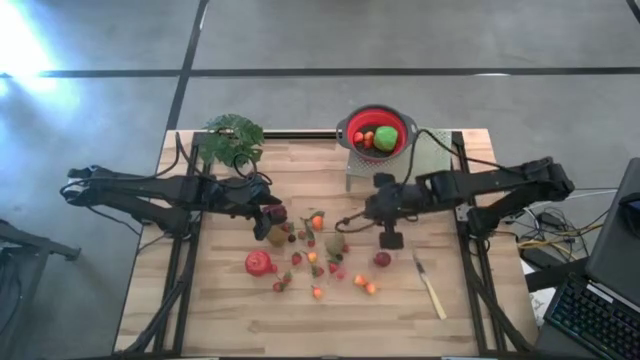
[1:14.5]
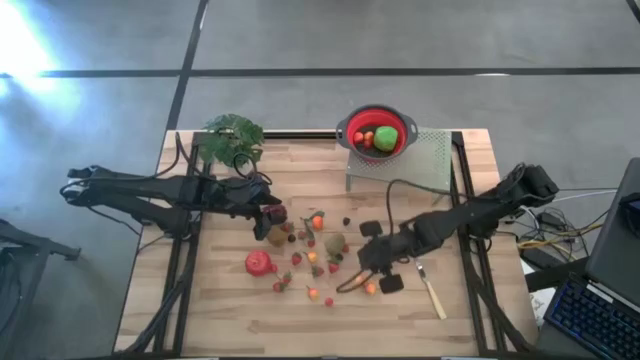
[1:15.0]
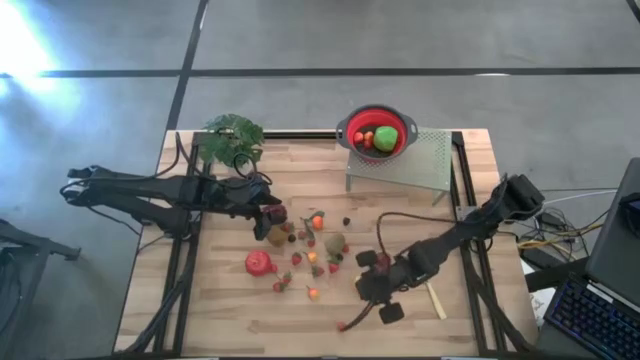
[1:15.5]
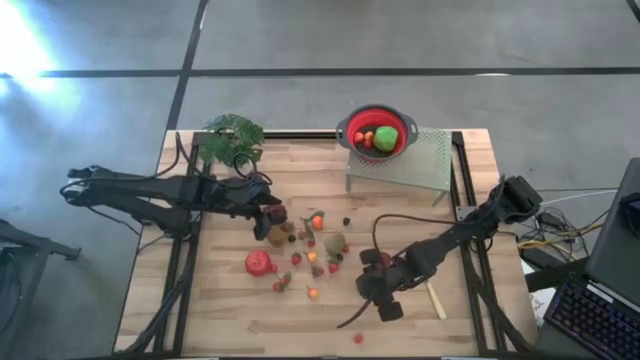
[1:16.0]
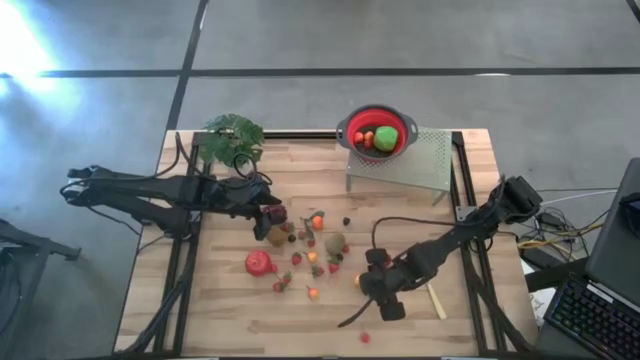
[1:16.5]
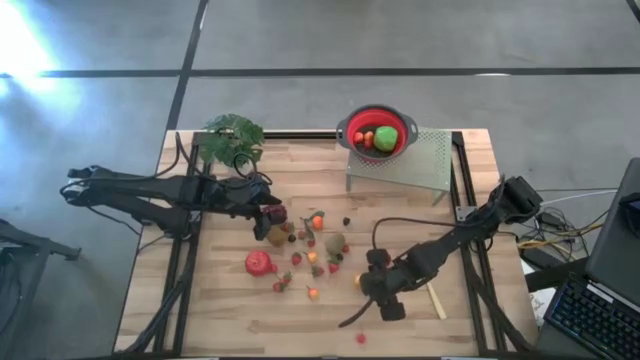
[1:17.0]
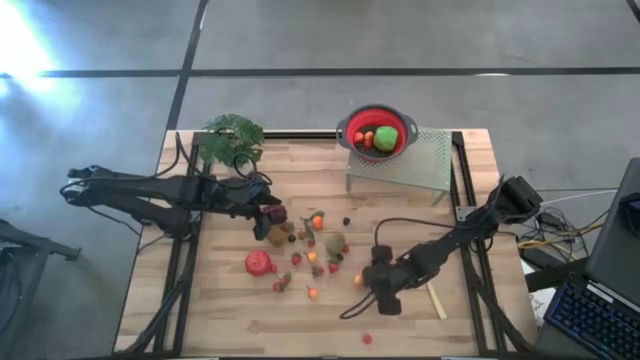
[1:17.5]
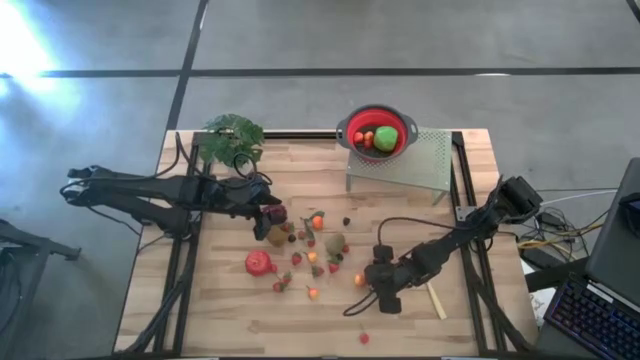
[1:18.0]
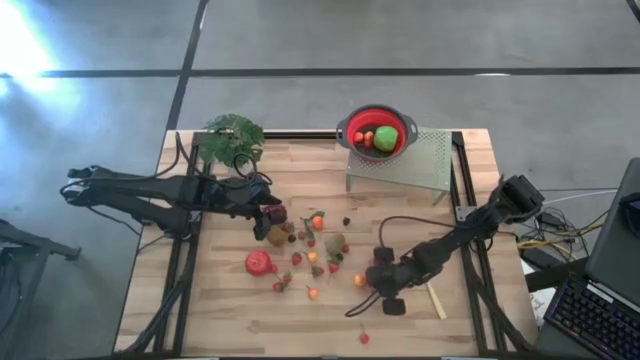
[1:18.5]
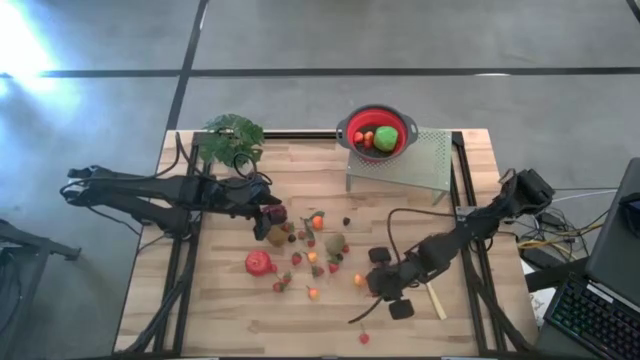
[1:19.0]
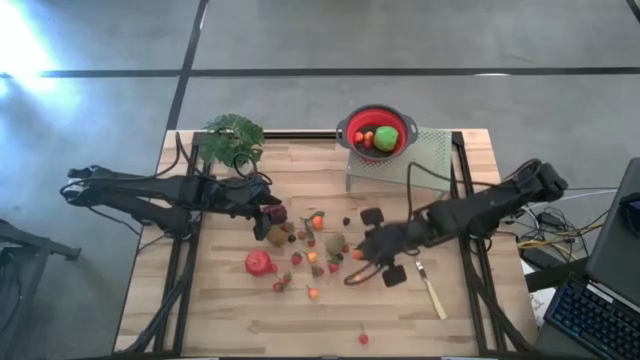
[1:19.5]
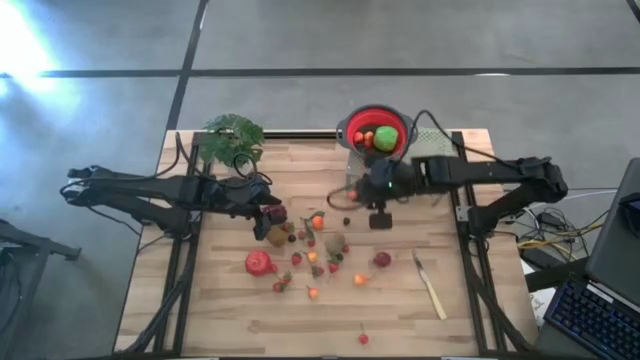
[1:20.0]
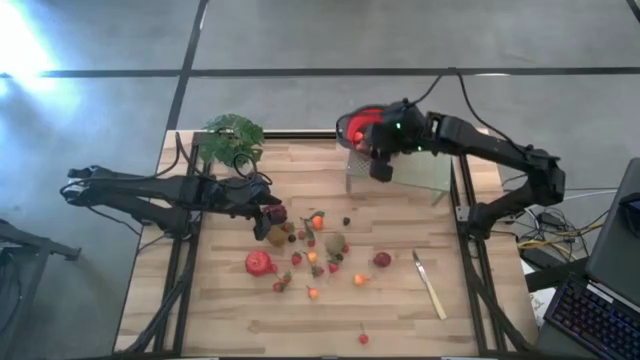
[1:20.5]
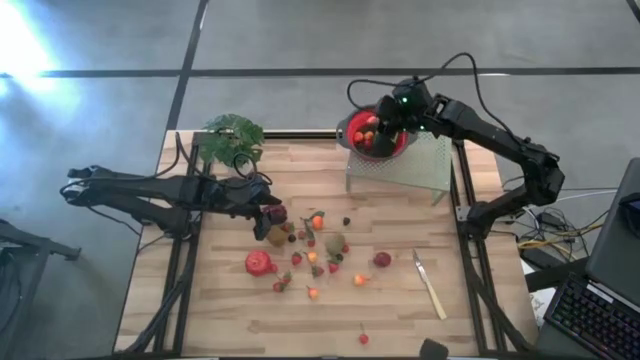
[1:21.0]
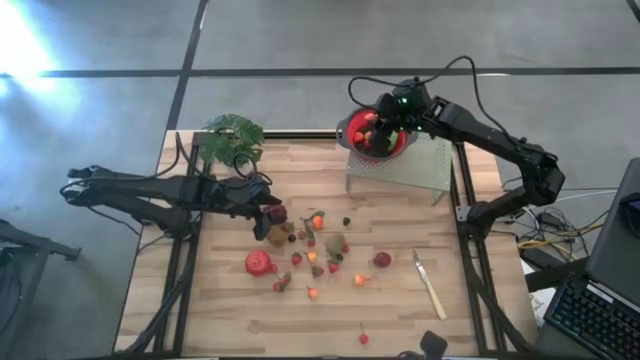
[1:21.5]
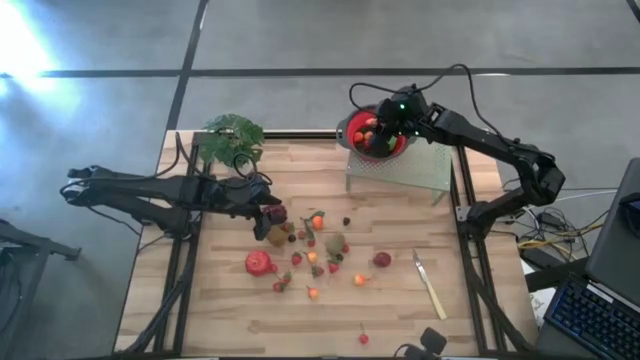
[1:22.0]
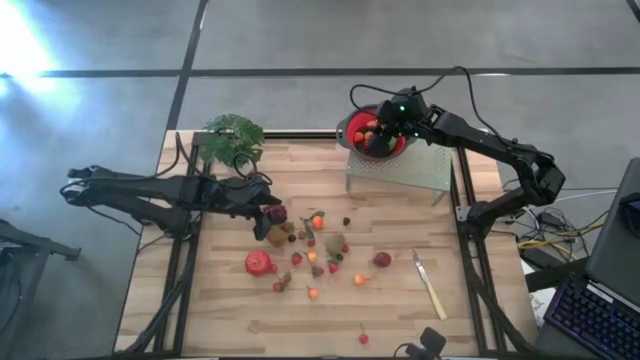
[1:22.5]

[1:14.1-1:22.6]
Task: Pick & Place Fruit
Put the pear into the strainer bowl on the shelf

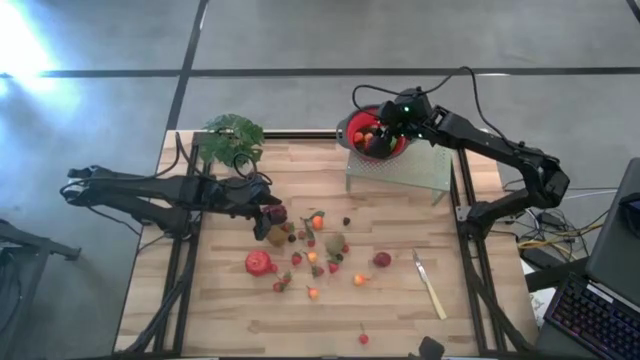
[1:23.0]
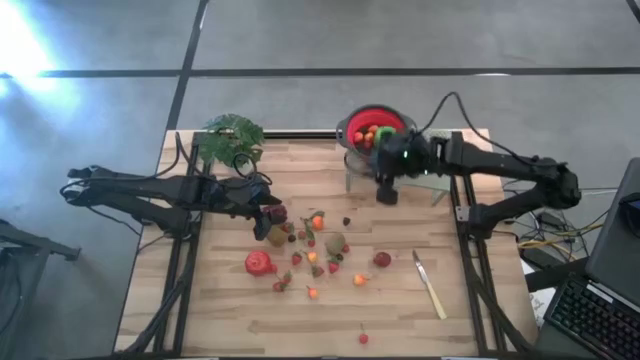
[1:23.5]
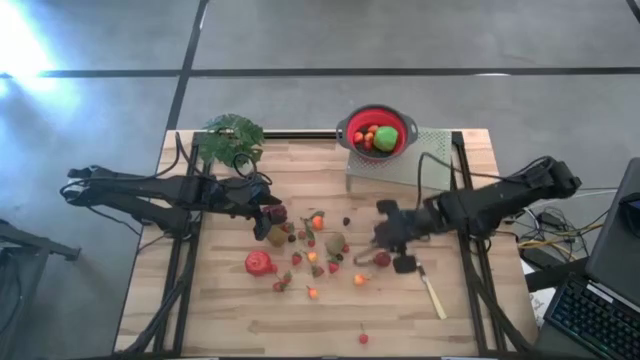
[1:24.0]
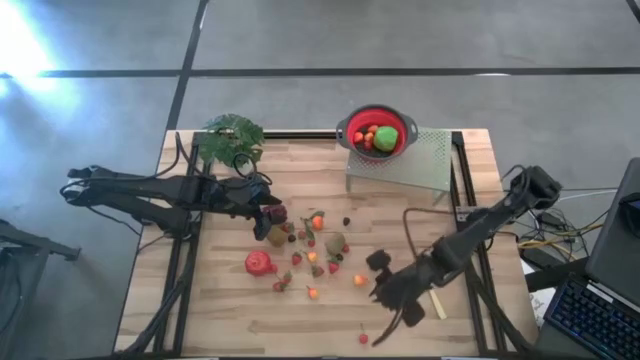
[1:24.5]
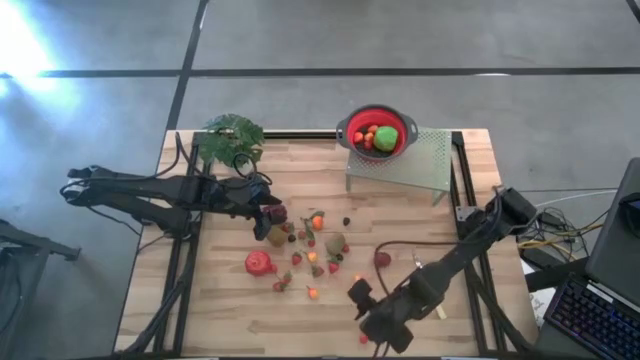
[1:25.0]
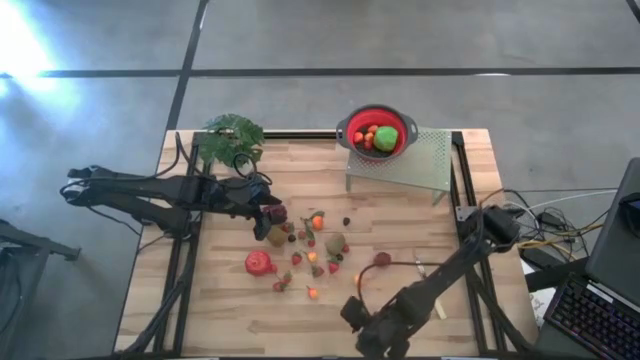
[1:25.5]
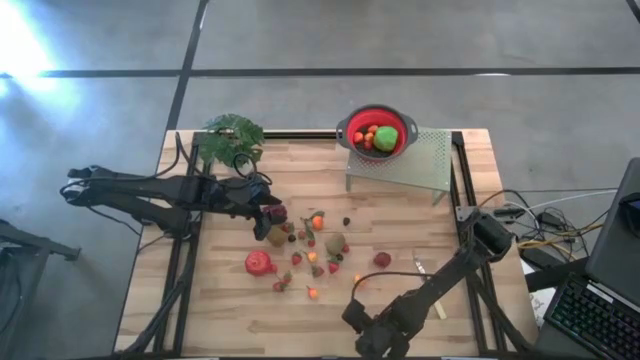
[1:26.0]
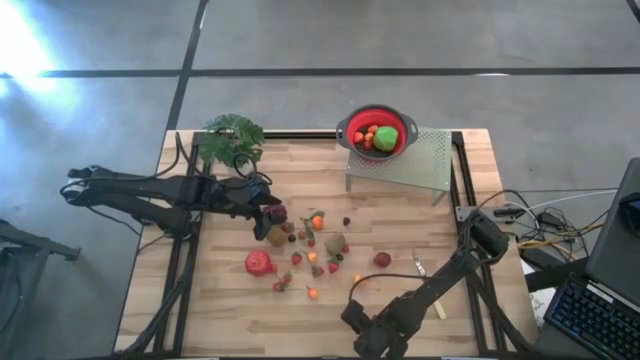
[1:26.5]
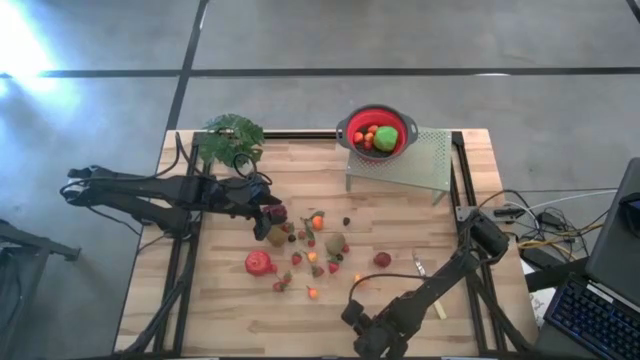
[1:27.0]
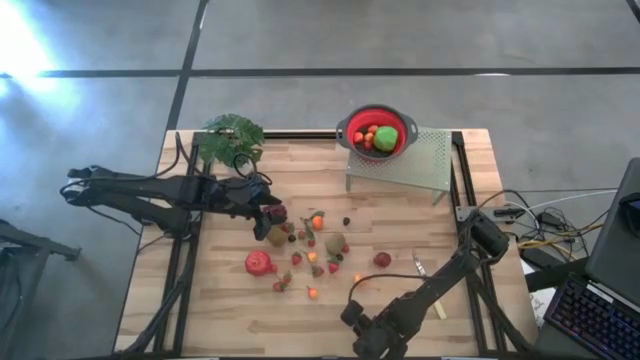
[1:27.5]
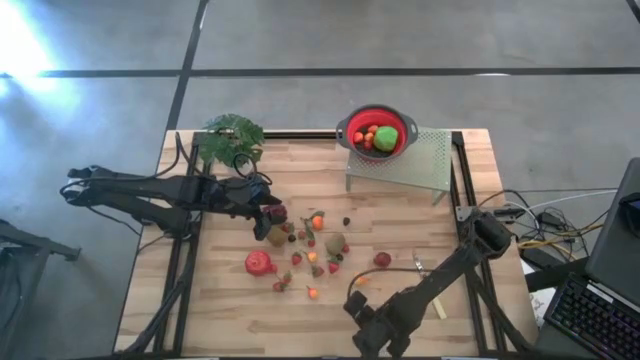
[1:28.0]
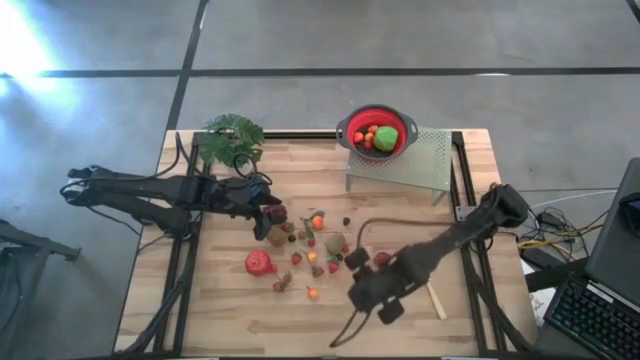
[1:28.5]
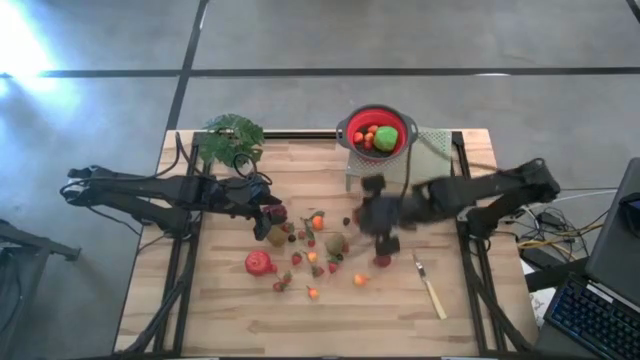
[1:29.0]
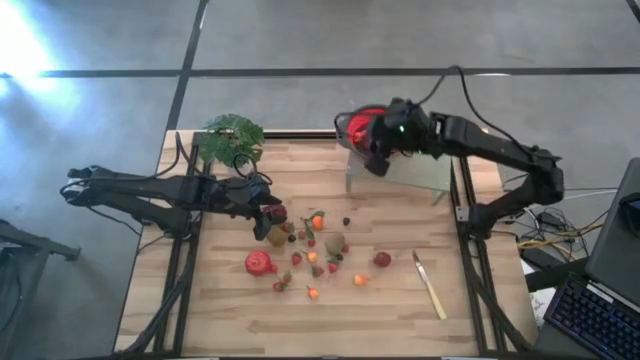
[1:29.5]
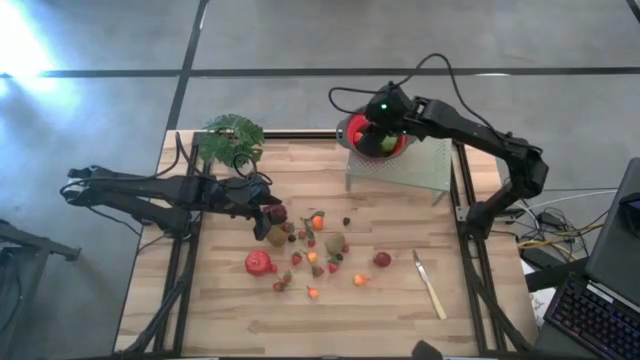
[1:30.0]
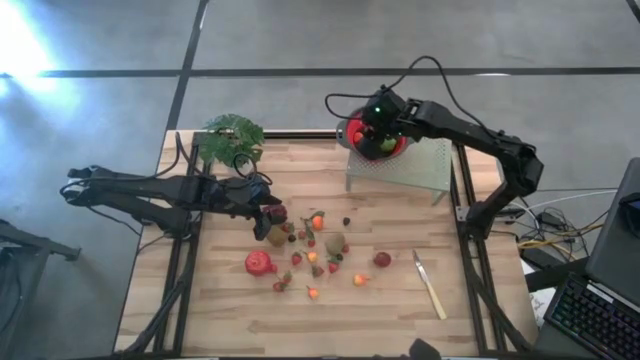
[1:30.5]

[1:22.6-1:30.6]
Put the red cherry into the strainer bowl on the shelf

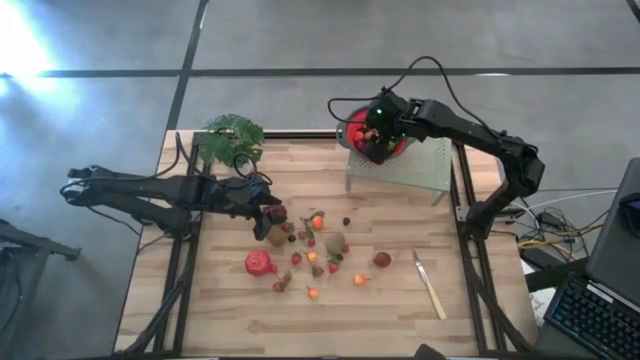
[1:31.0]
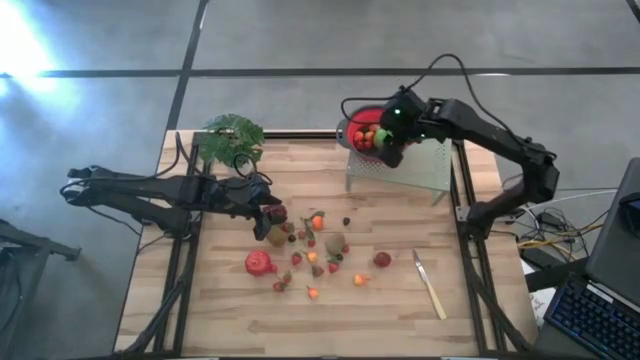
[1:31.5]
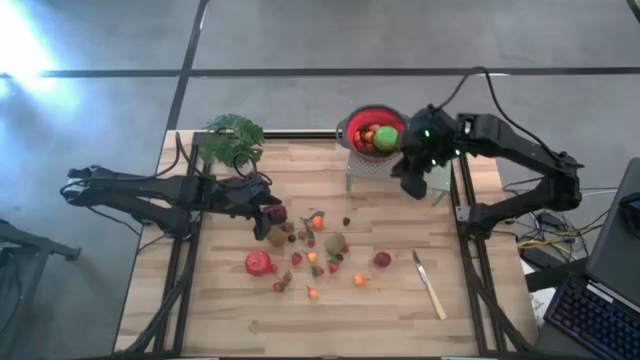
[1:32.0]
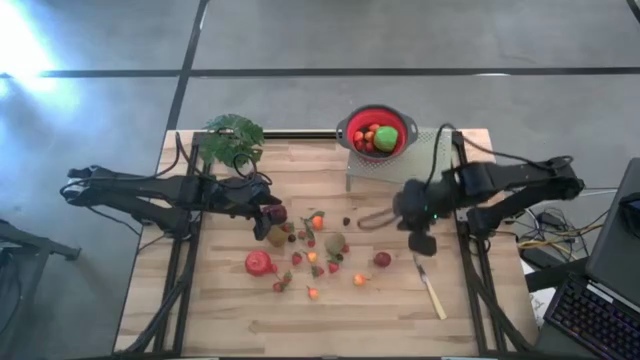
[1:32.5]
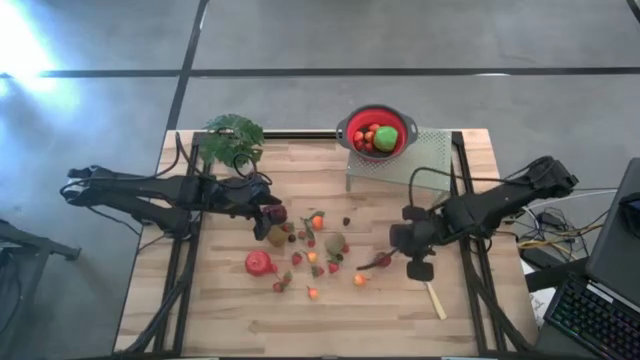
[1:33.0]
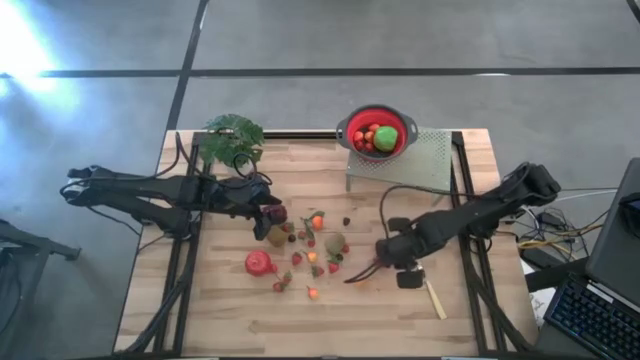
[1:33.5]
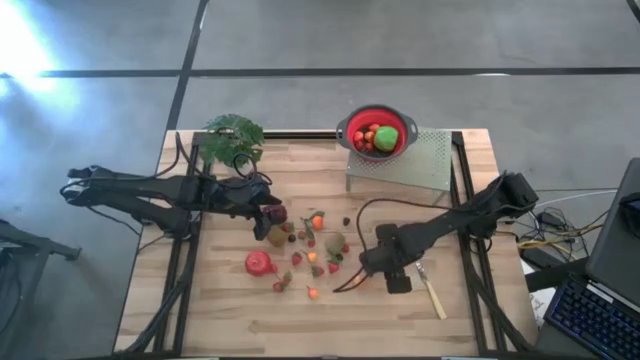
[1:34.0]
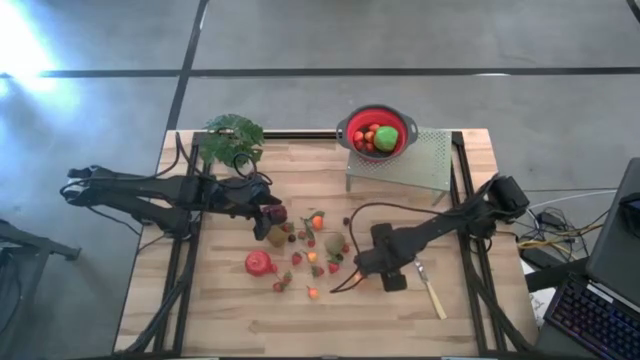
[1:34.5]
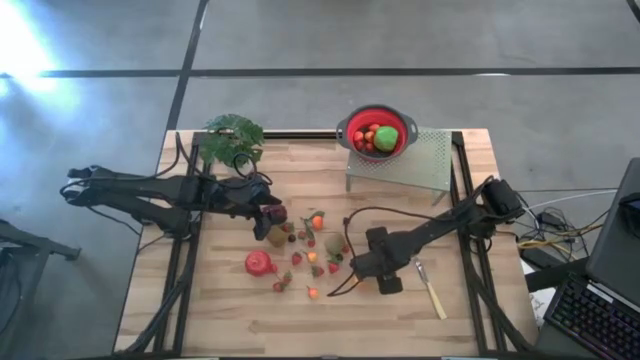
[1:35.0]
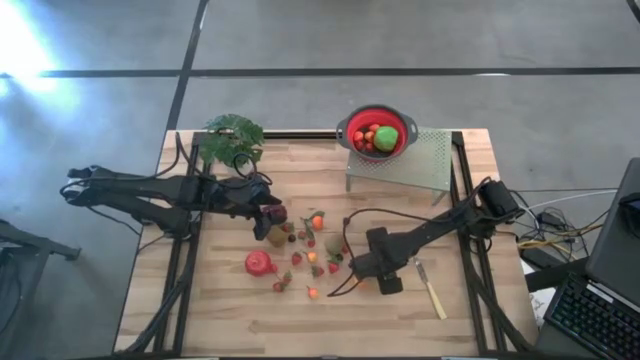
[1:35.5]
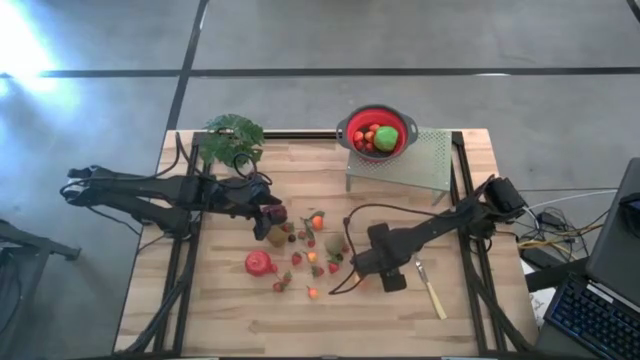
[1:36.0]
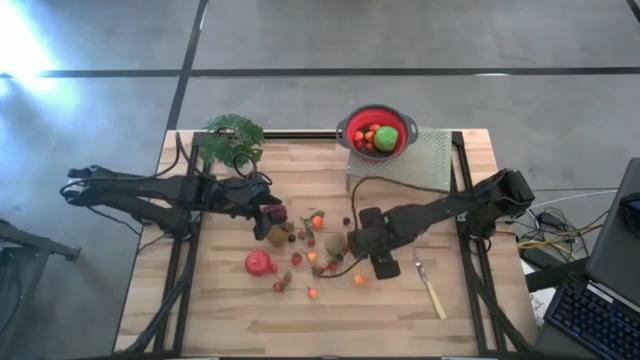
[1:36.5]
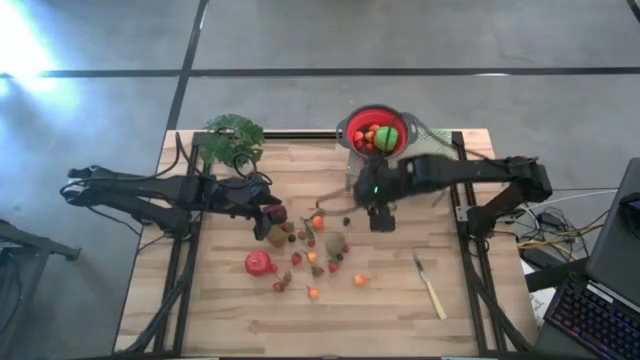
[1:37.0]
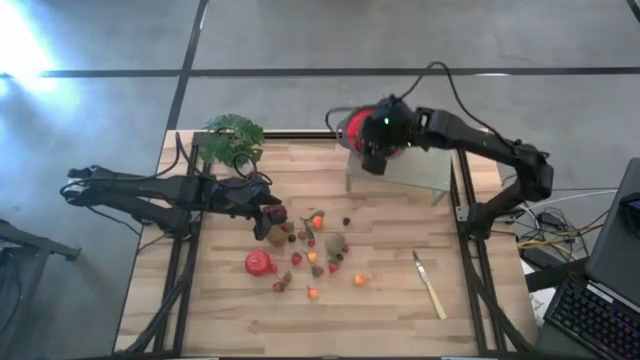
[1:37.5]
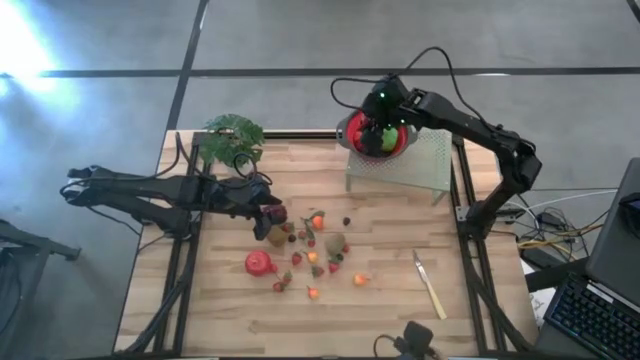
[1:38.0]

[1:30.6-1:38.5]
Put the pomegranate into the strainer bowl on the shelf
